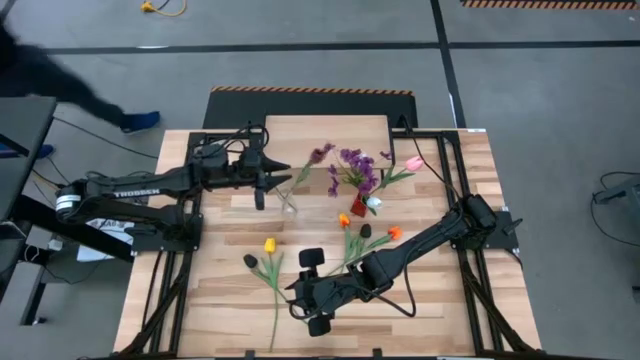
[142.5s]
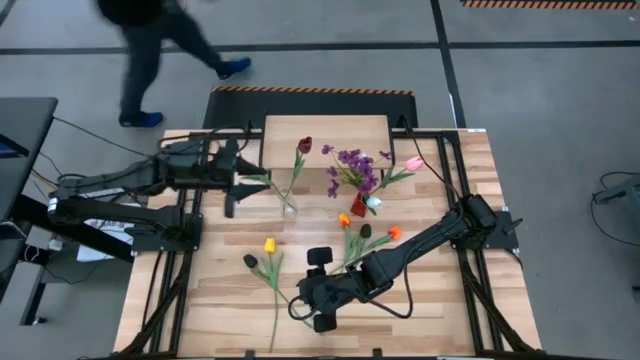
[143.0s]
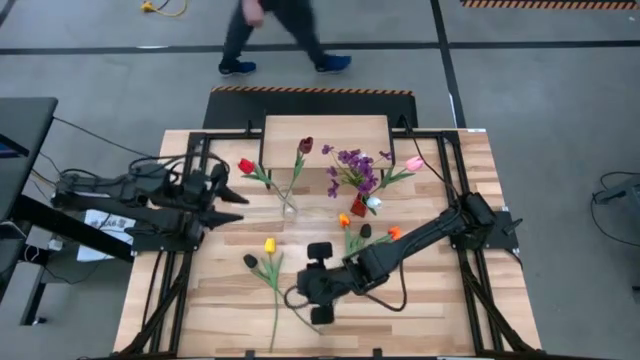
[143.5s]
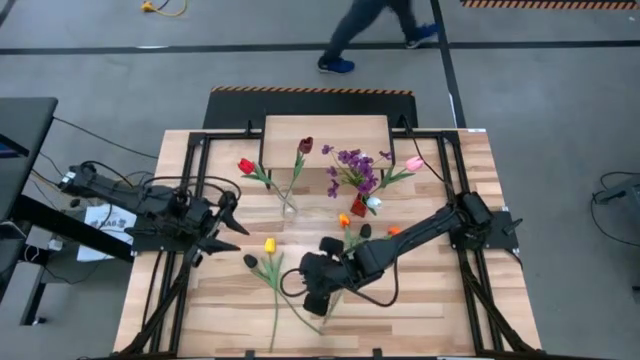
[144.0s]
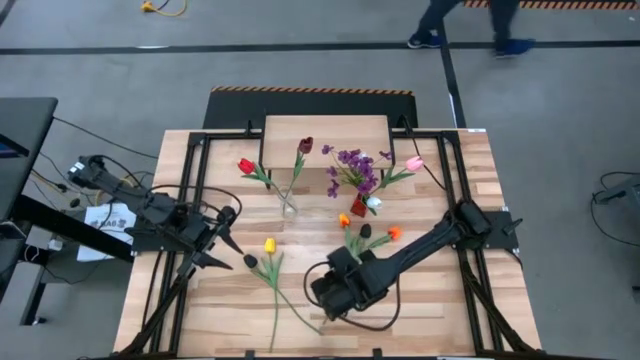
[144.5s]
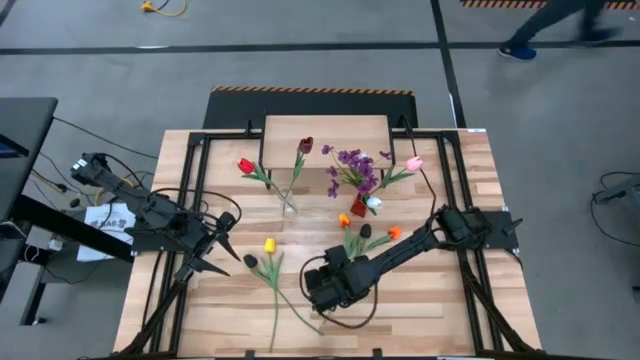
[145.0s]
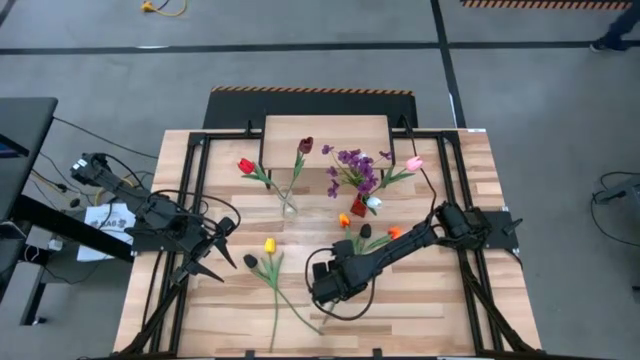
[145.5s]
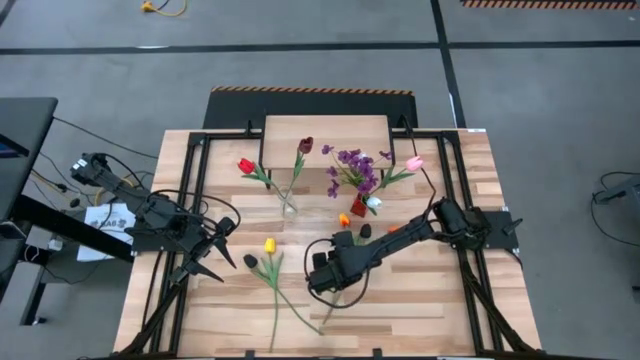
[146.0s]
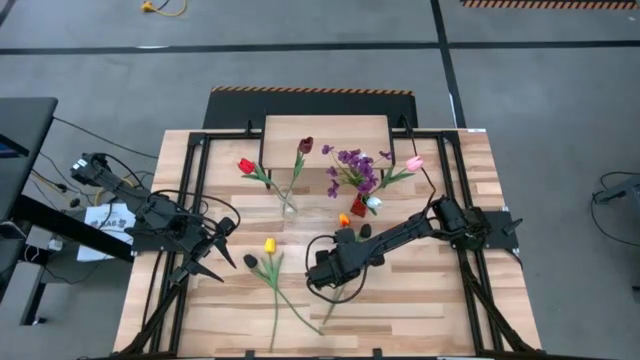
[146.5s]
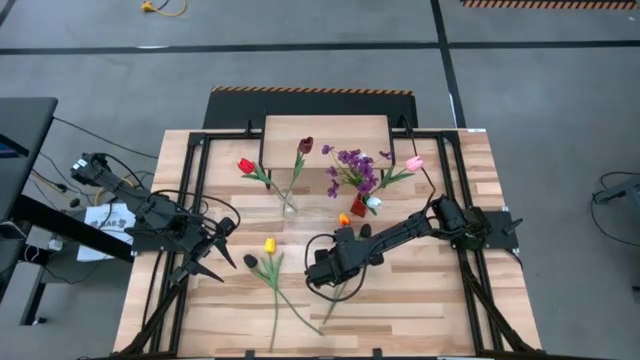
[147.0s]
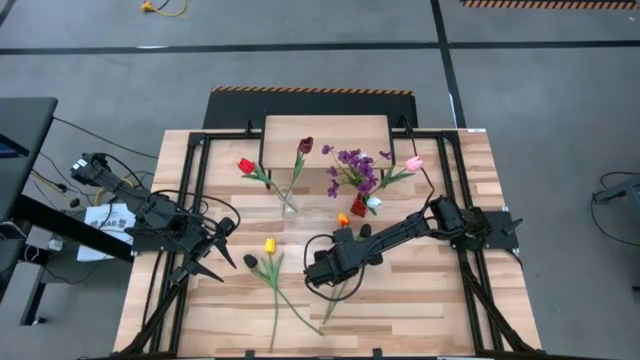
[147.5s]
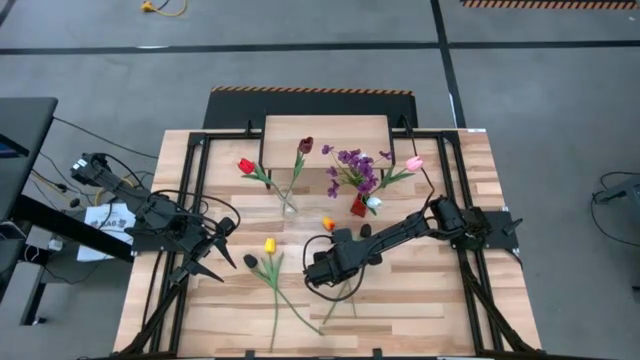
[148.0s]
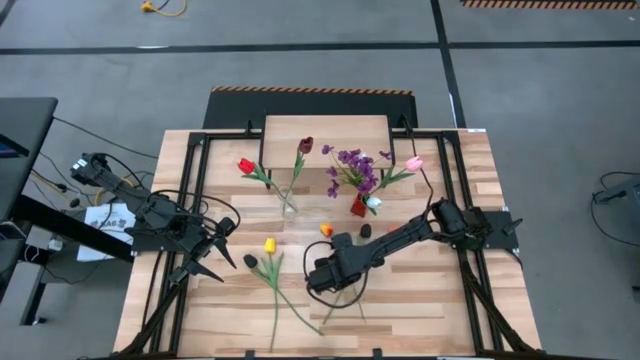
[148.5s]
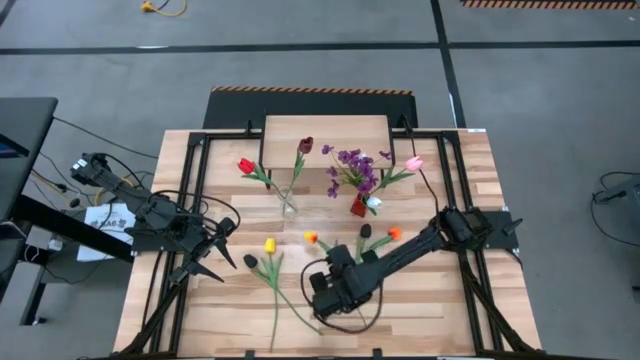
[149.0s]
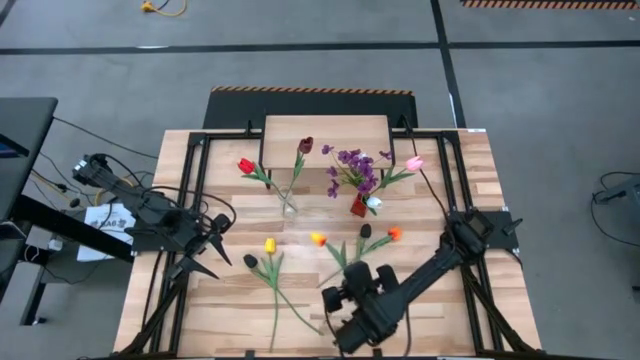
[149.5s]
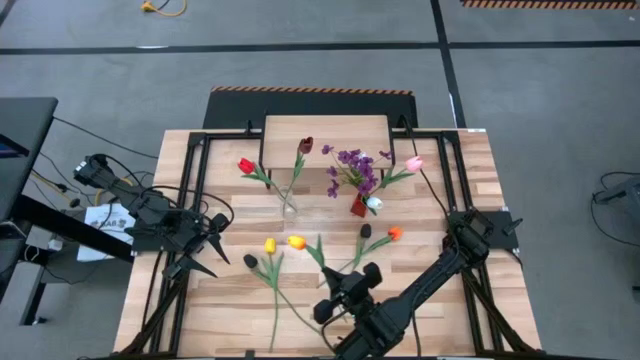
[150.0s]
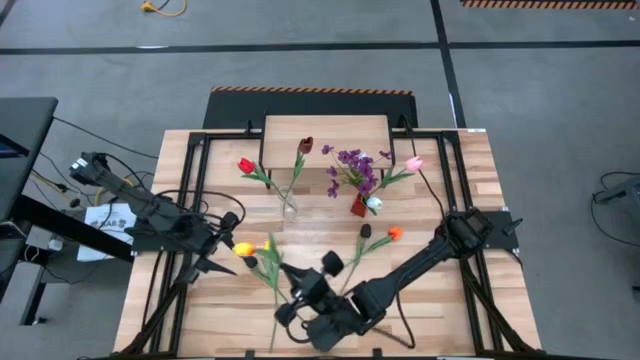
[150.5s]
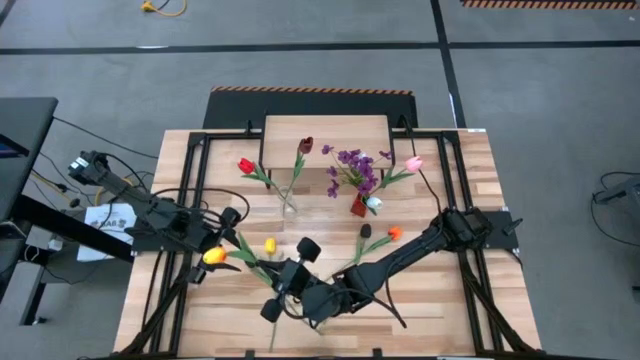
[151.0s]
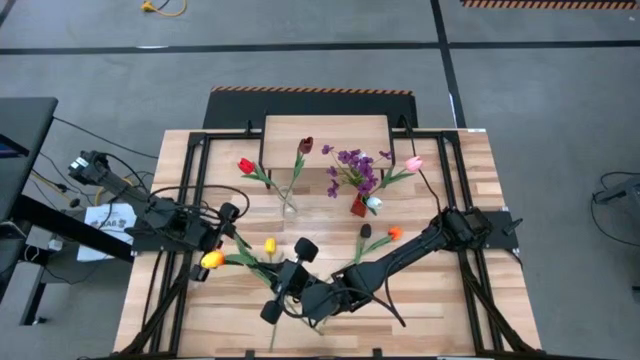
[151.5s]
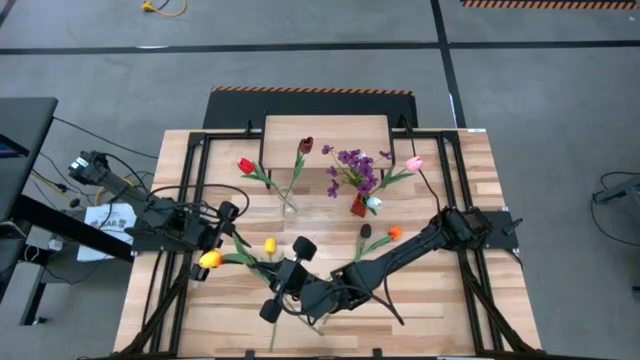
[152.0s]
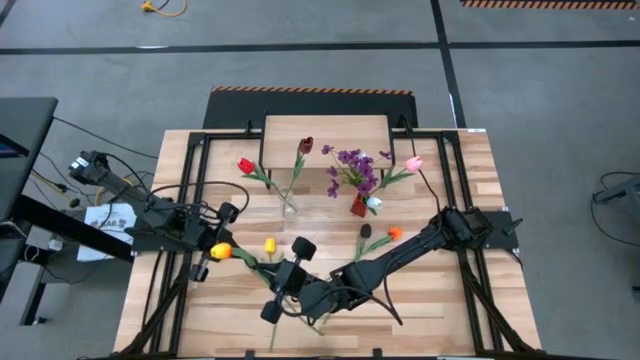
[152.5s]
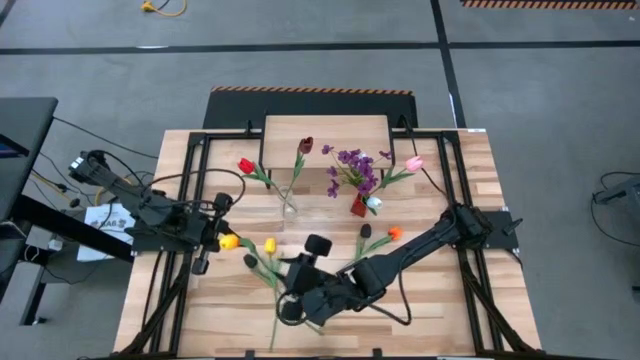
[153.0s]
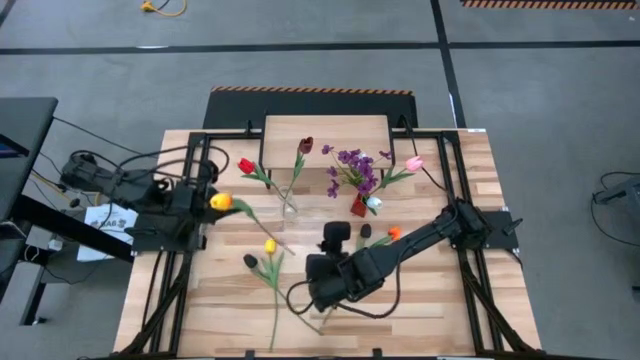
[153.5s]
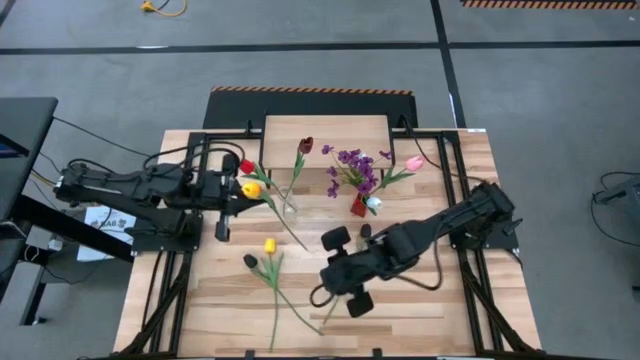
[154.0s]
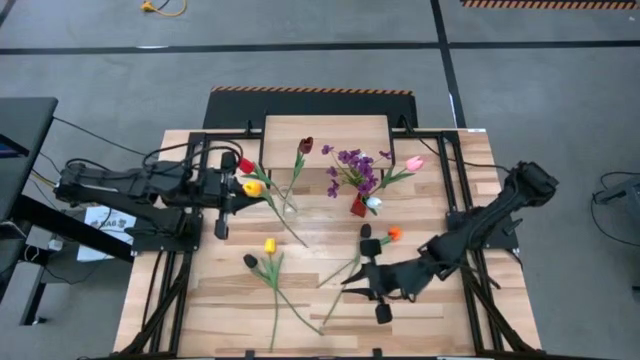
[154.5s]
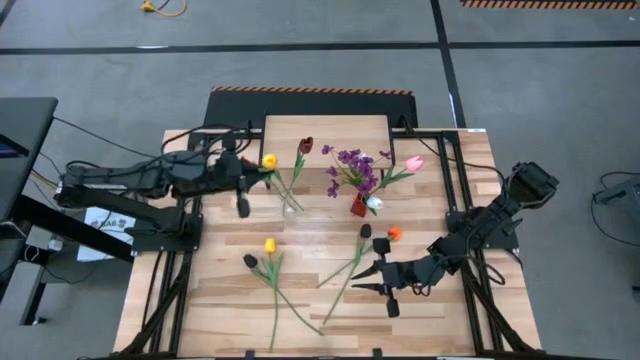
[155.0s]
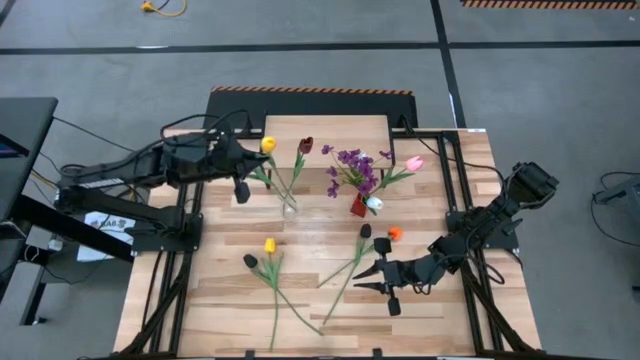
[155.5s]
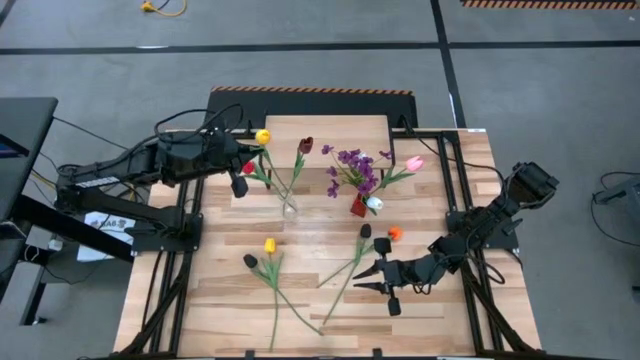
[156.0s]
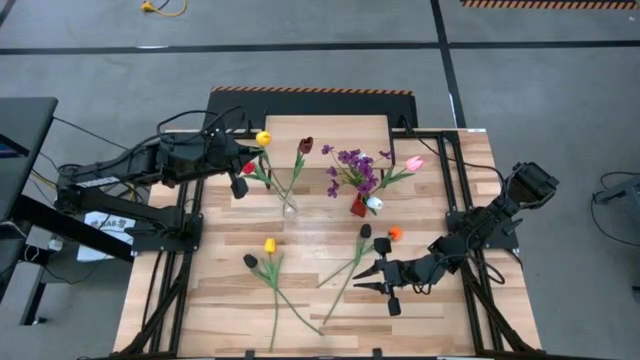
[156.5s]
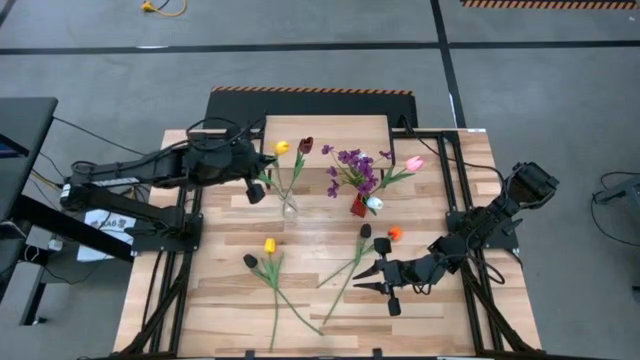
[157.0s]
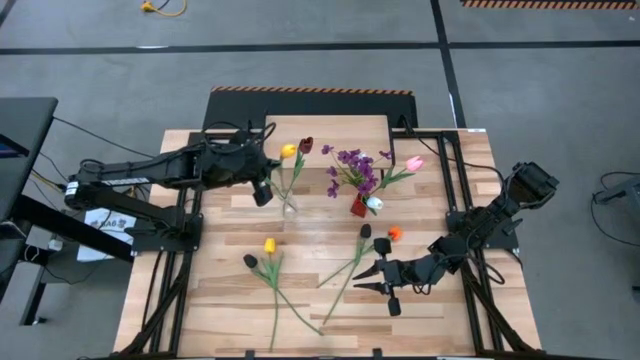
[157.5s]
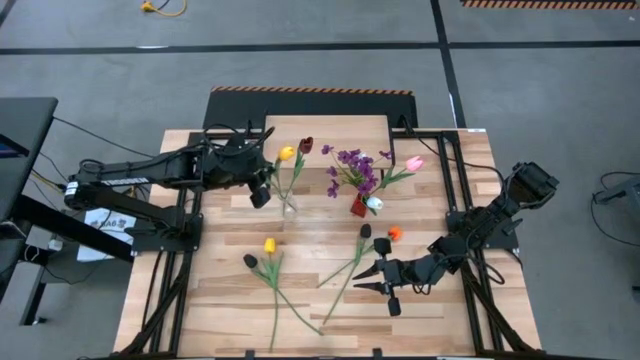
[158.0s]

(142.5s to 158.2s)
Task: Pick and place flowers into a vace then onto a shelf
Put the yellow orange flower into the transparent flower vase

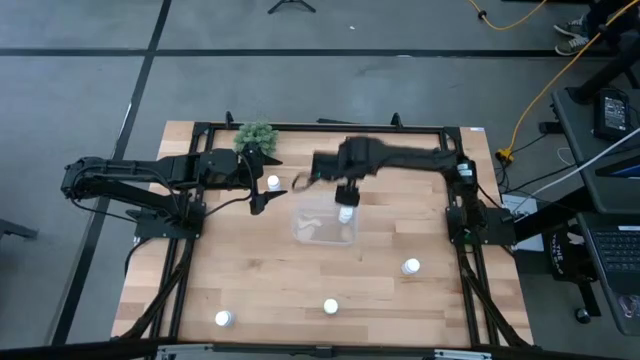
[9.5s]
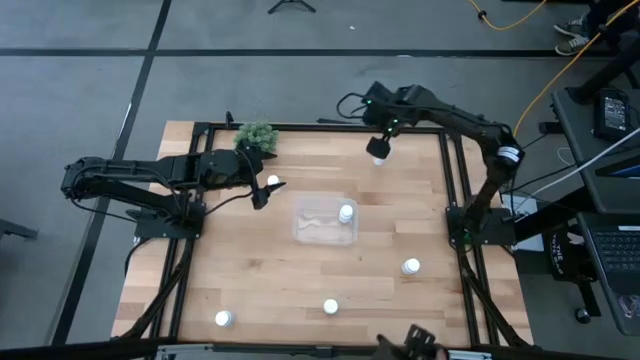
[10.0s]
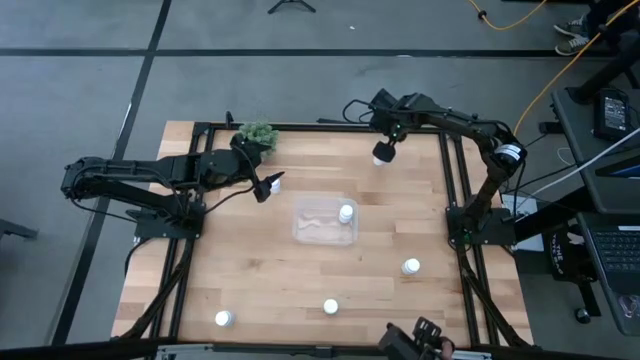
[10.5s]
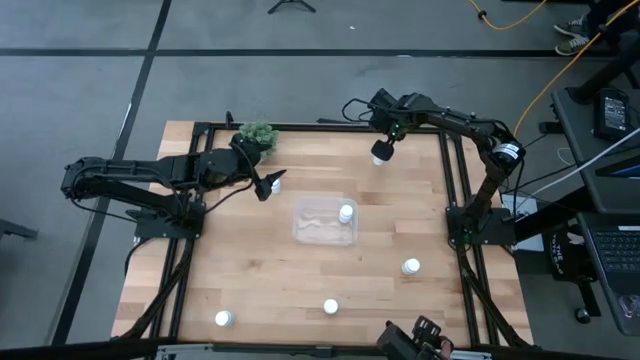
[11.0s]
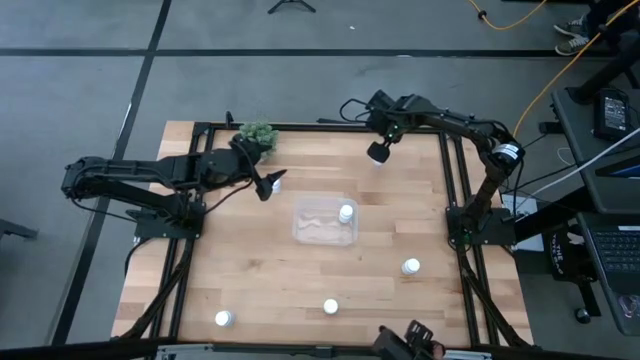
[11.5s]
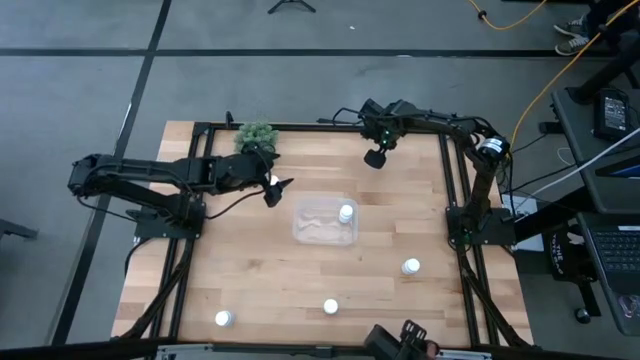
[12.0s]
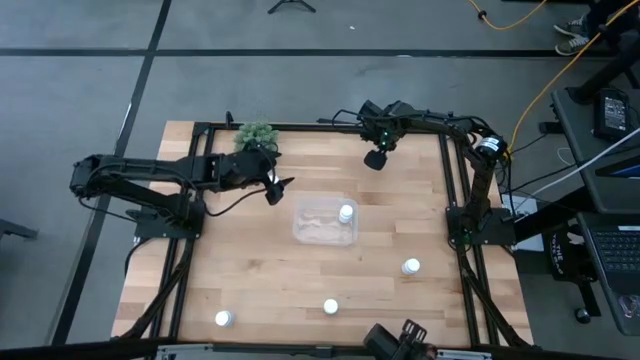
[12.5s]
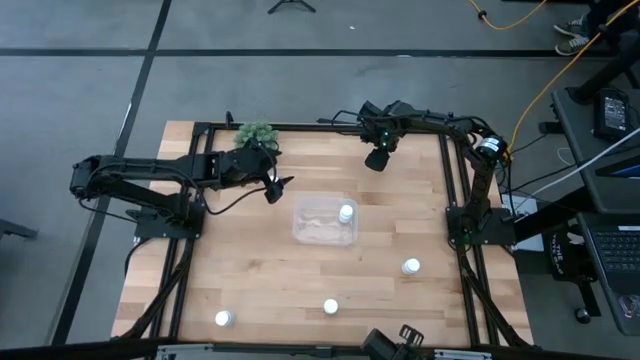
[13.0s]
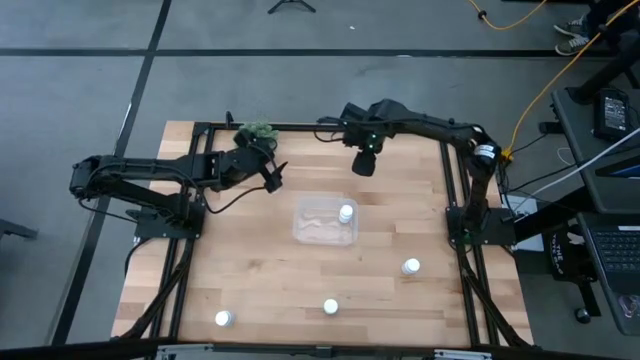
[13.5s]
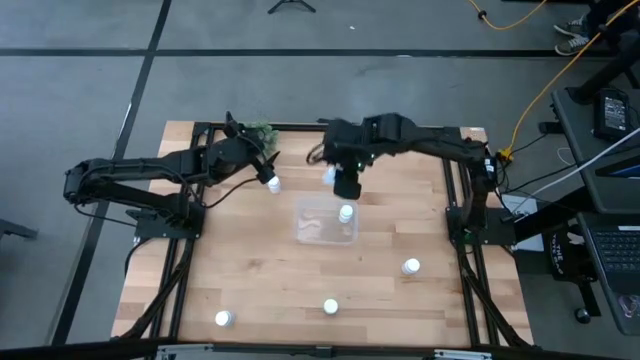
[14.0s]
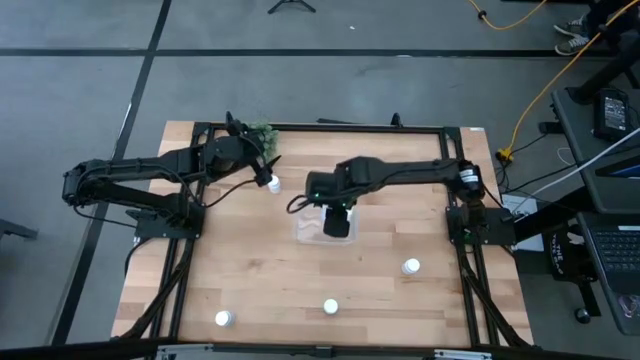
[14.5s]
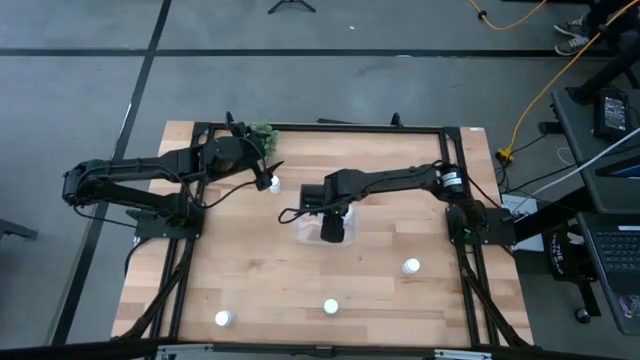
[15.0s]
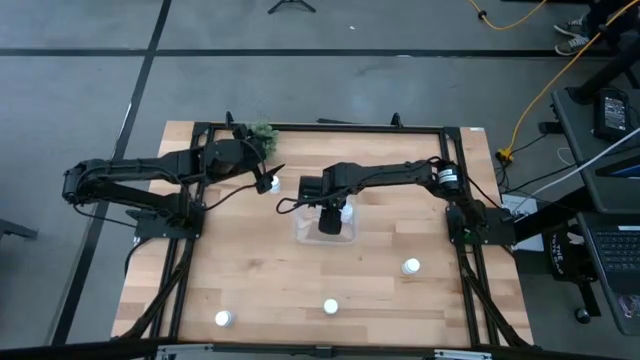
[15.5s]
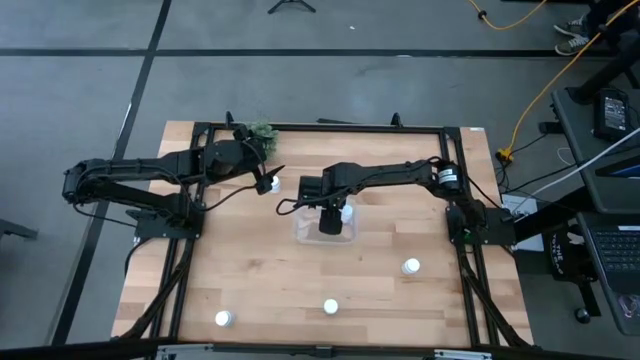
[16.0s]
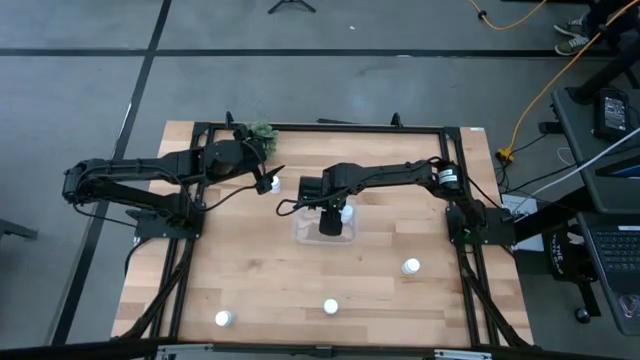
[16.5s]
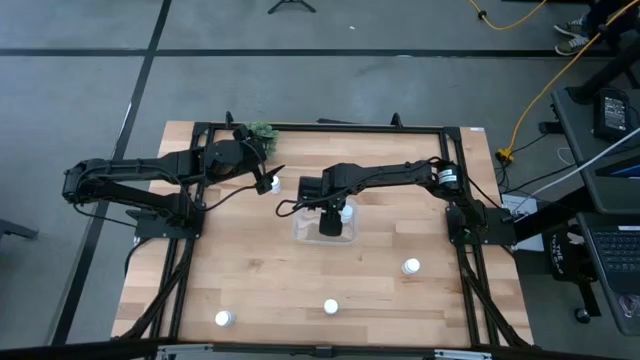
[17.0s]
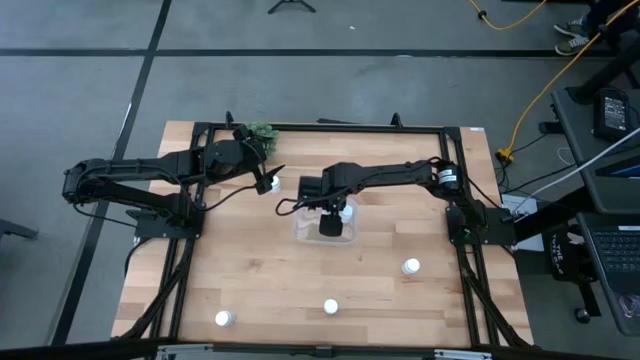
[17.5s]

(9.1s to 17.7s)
Task: Pick and place pill bottles into a basket
Put the white medicine bottle into the transparent bin
